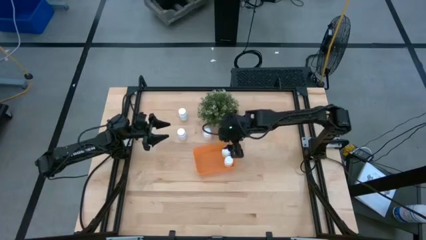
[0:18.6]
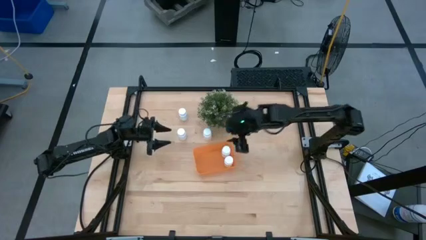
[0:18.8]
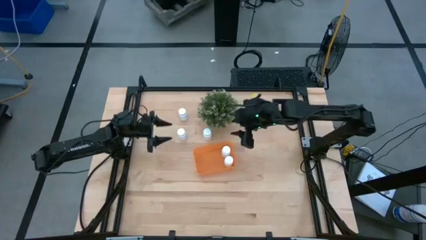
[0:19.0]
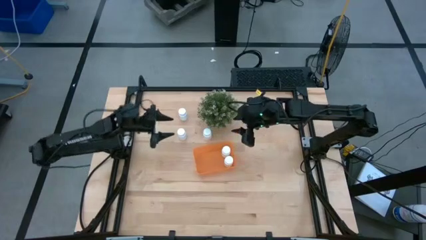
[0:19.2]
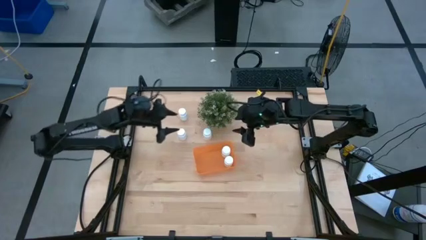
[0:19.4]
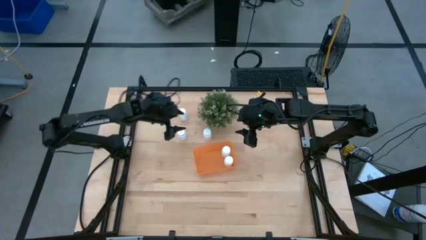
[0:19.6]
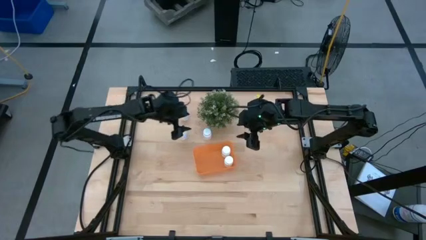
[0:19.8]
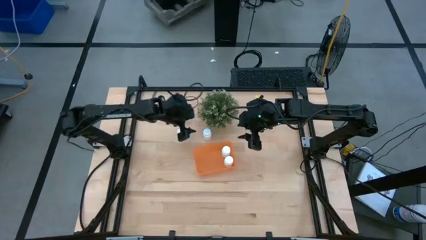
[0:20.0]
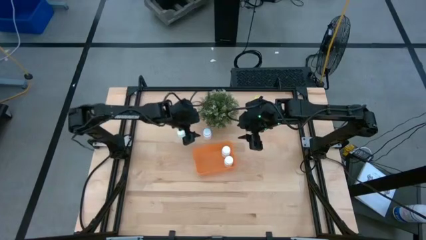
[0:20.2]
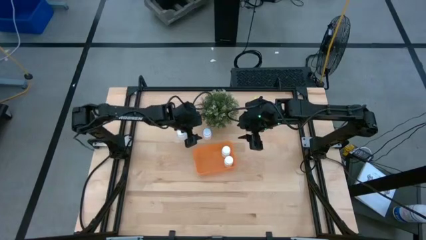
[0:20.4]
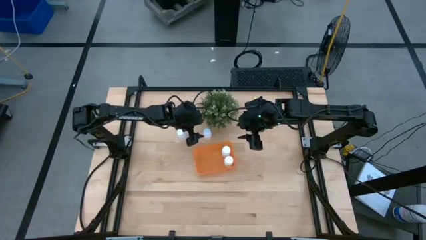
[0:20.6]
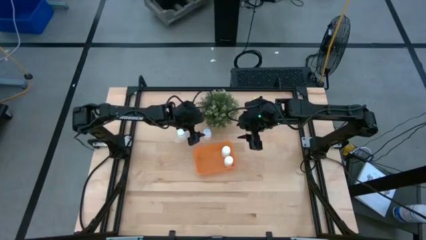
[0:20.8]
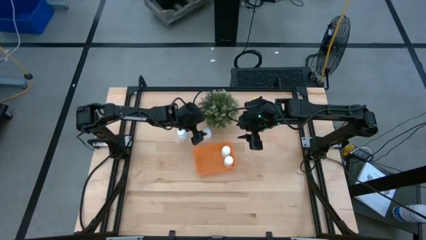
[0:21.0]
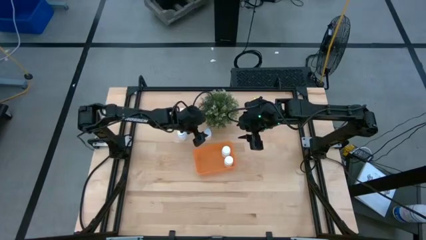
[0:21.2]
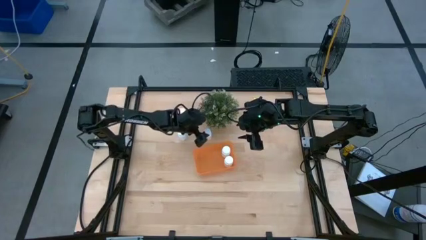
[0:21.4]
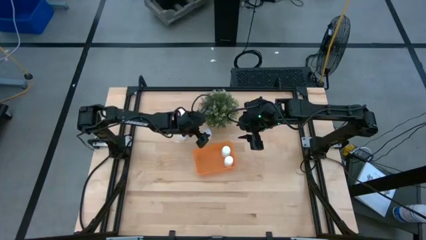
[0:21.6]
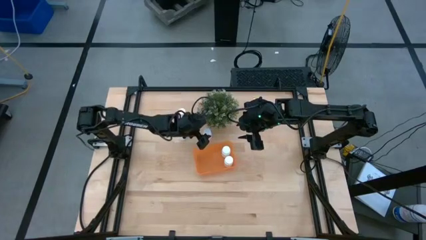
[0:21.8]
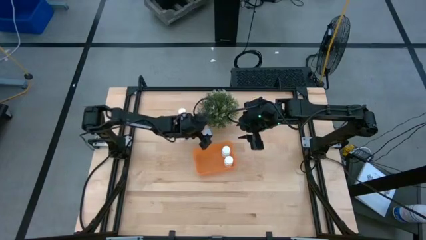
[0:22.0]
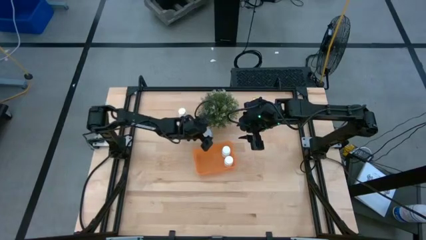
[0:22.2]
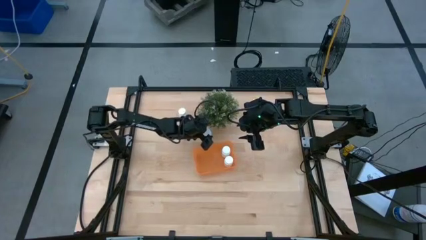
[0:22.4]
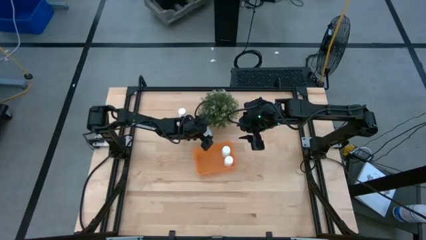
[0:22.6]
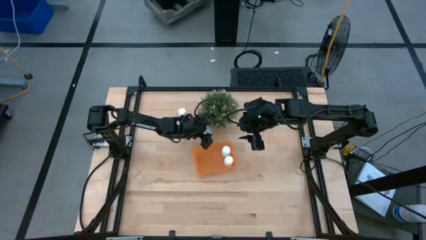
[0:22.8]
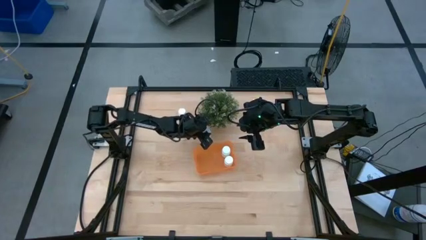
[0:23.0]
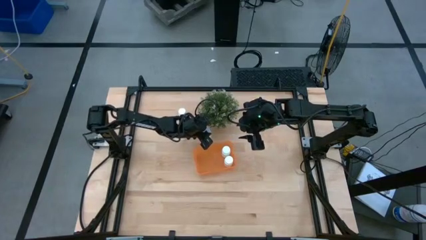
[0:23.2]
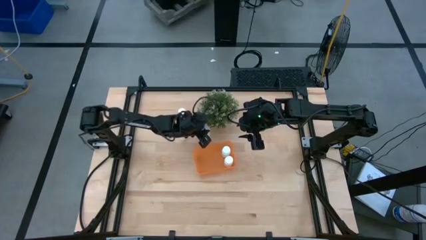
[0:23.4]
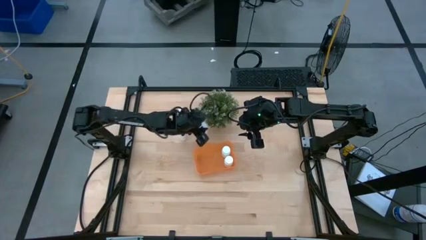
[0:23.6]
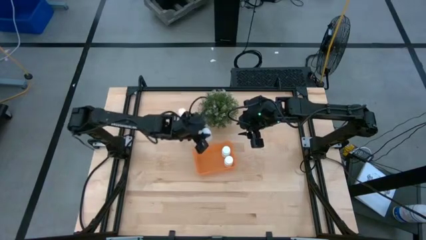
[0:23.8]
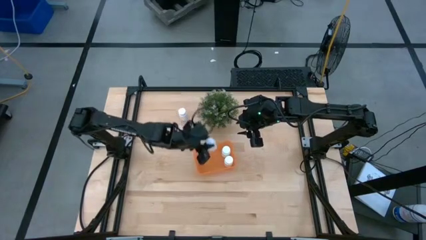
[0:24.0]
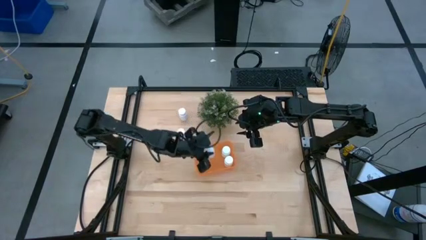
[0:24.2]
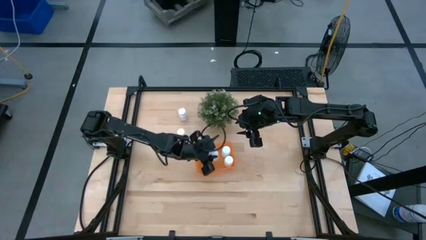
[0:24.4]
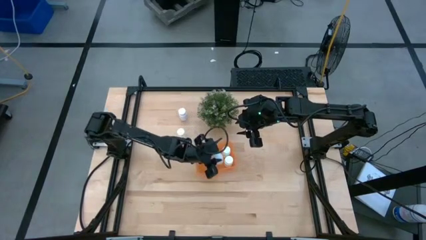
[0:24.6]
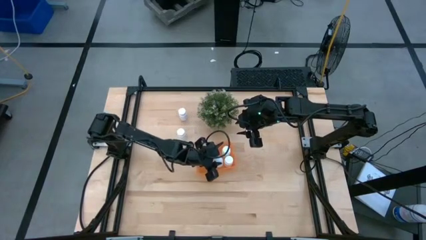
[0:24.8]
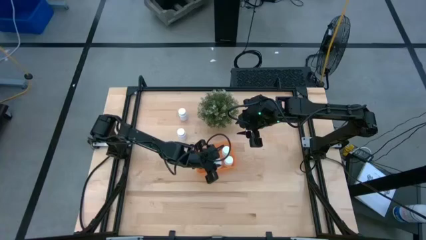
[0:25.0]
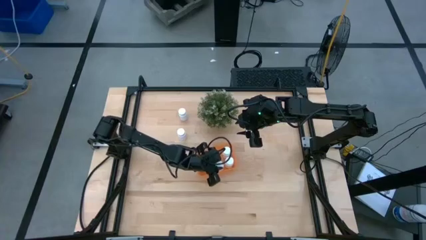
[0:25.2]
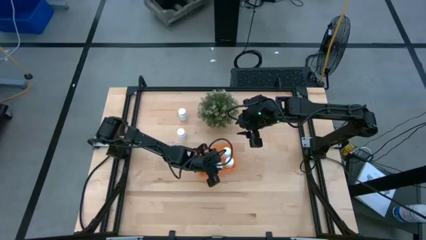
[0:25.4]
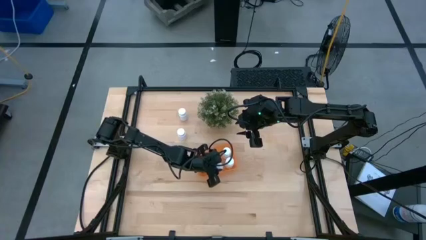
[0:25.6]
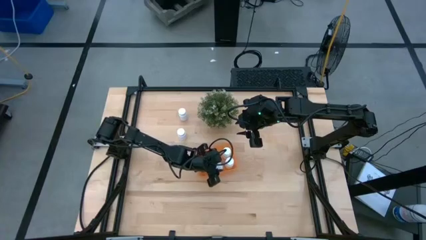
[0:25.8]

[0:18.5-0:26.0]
Task: Pick and place pill bottles into a basket
Put the bottom right white pill bottle into the orange bin

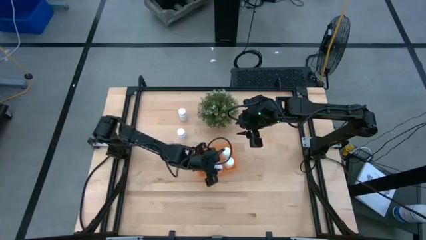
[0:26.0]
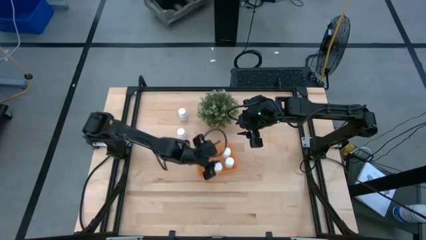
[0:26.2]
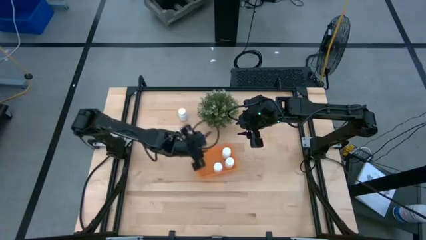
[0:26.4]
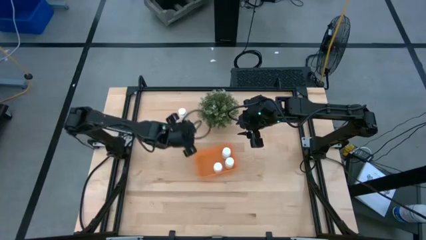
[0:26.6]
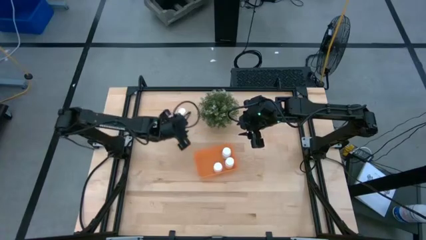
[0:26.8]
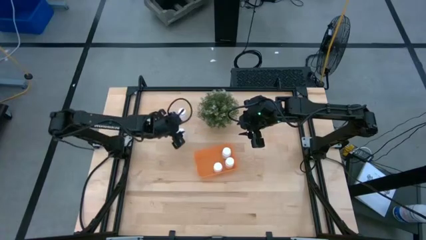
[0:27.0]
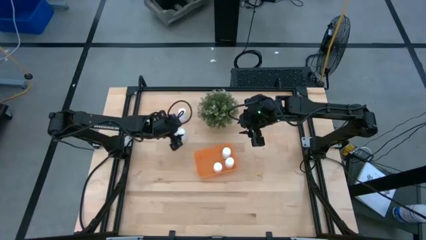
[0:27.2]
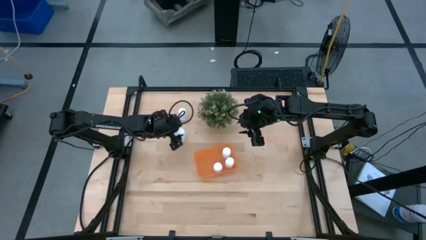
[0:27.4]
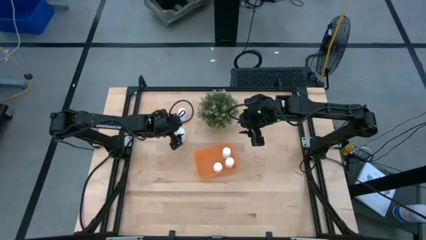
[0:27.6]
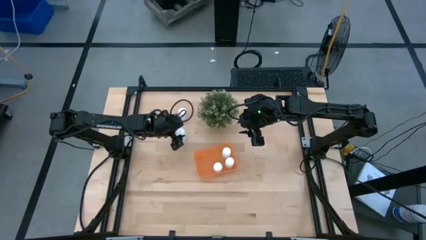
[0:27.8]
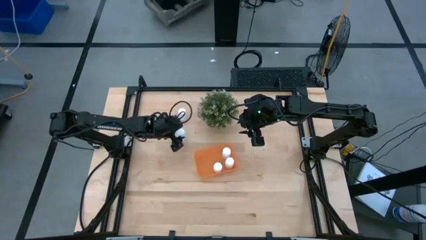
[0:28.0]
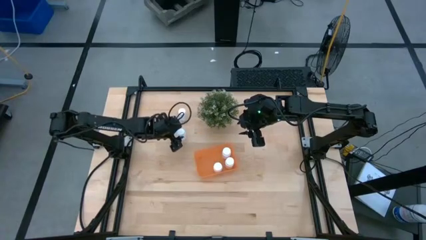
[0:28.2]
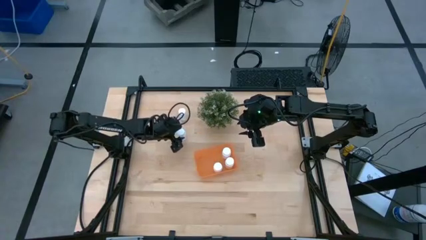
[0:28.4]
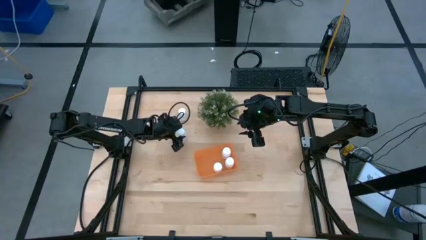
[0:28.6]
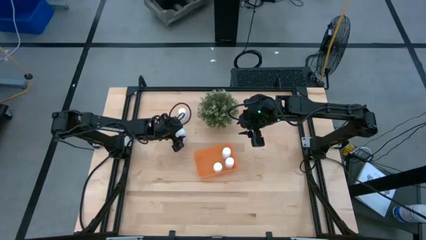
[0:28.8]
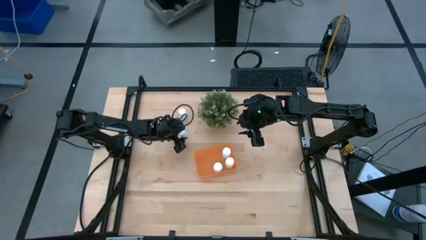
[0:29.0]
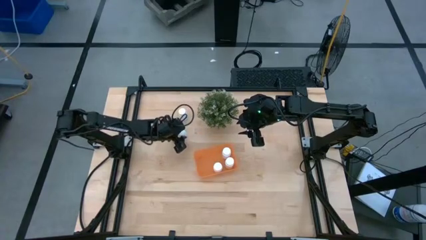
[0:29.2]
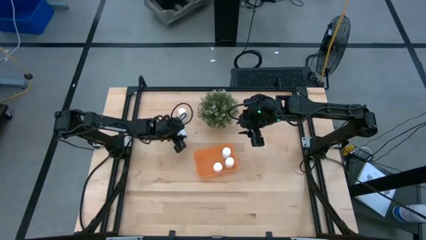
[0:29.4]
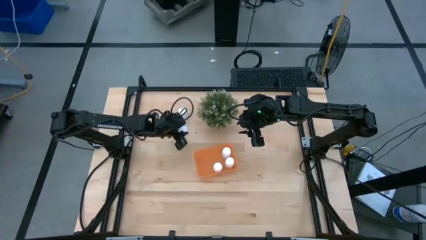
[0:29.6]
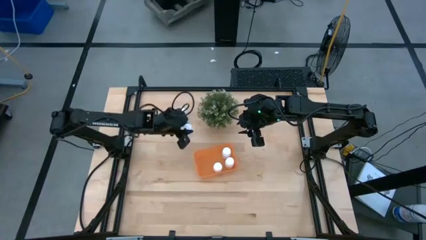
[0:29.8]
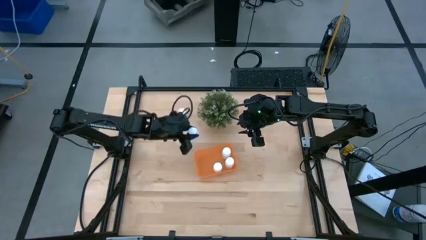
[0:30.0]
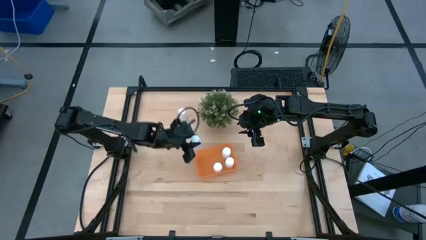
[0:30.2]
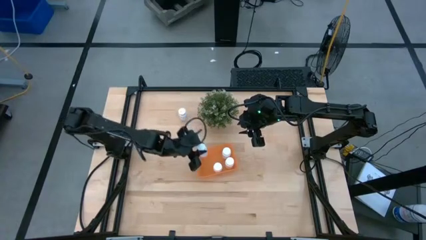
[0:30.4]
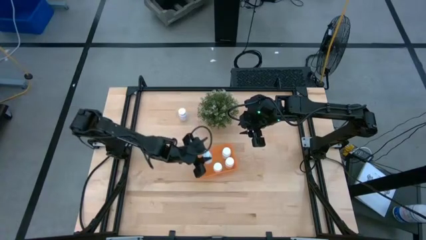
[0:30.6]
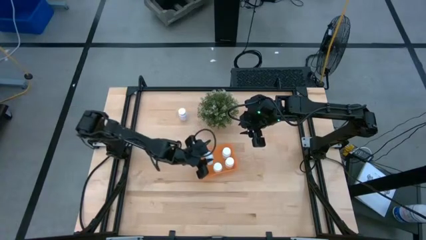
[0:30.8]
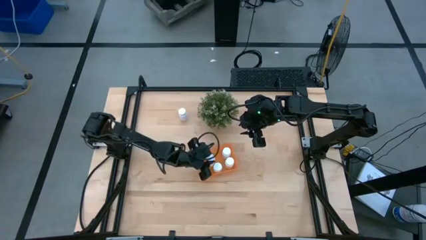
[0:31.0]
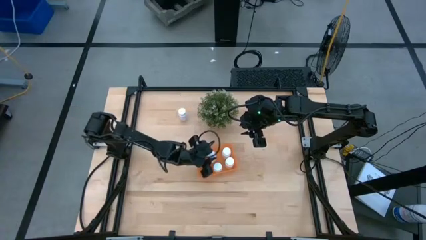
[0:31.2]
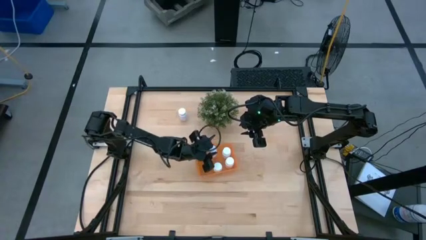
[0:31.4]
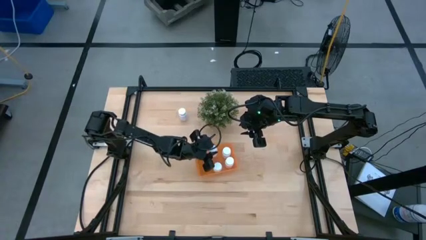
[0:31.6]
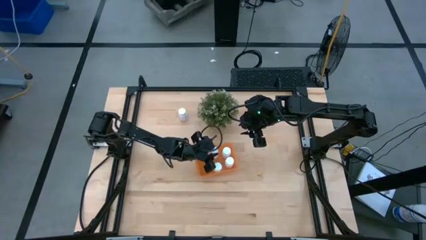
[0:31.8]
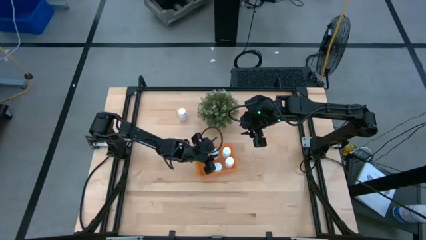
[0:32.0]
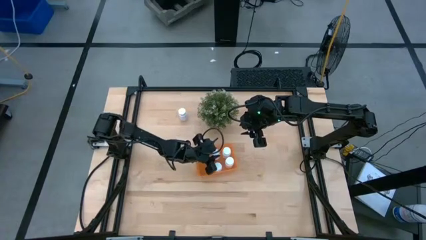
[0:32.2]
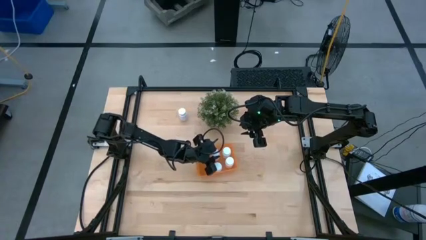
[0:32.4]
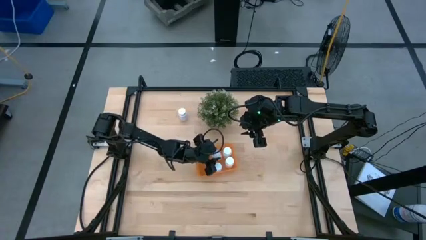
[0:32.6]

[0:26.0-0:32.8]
Put the bottom white pill bottle into the orange bin

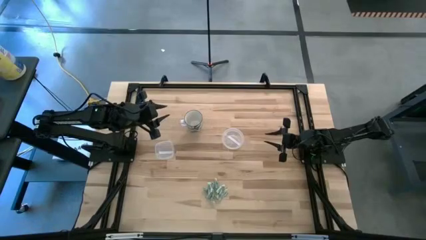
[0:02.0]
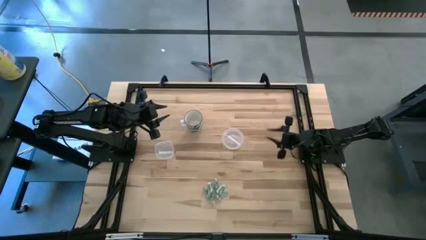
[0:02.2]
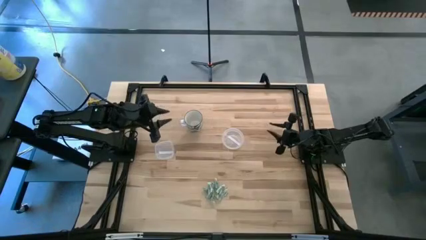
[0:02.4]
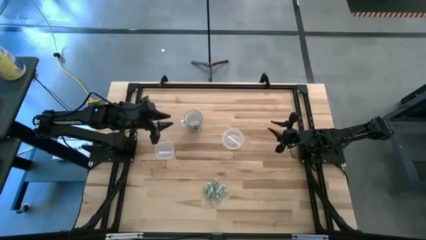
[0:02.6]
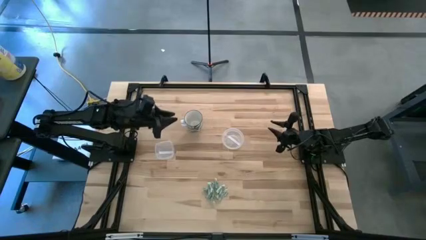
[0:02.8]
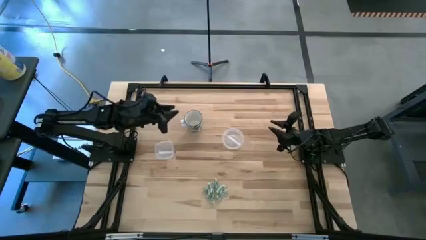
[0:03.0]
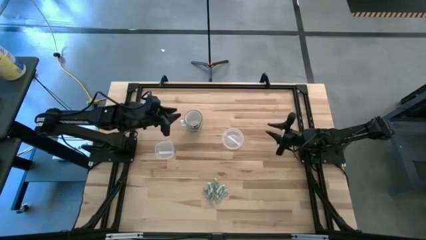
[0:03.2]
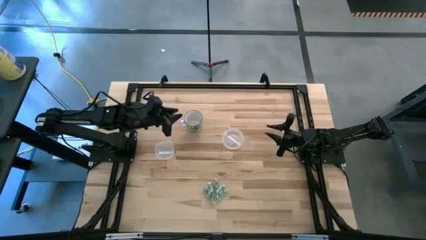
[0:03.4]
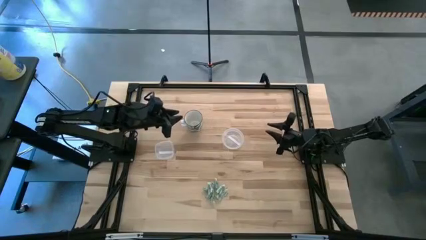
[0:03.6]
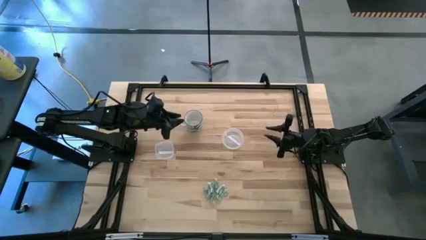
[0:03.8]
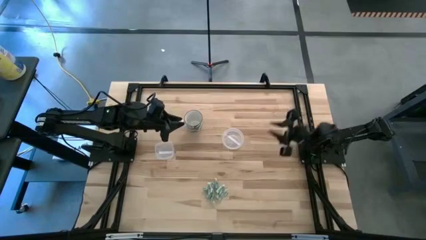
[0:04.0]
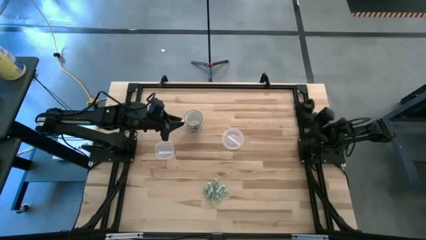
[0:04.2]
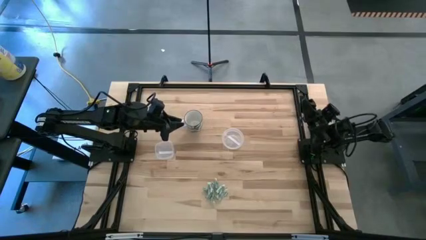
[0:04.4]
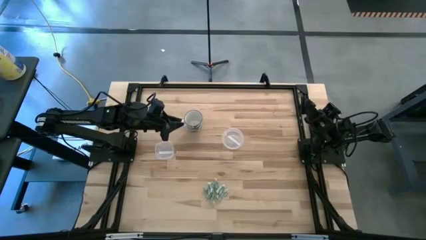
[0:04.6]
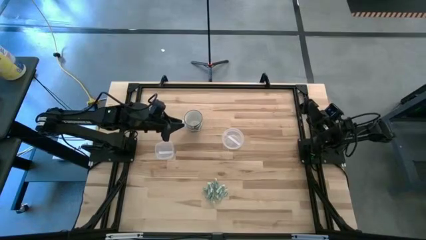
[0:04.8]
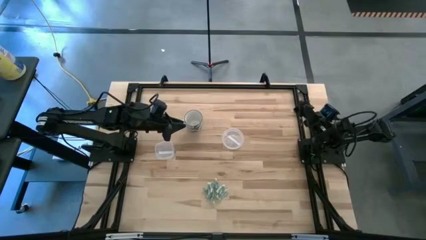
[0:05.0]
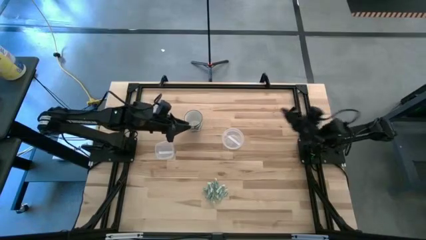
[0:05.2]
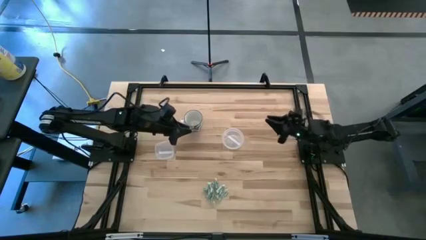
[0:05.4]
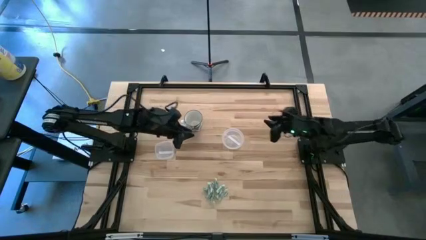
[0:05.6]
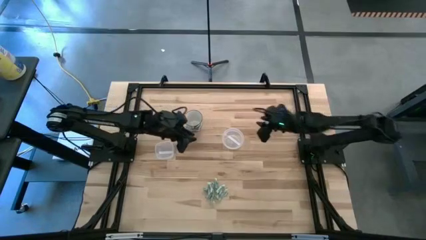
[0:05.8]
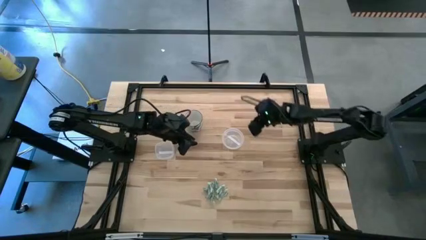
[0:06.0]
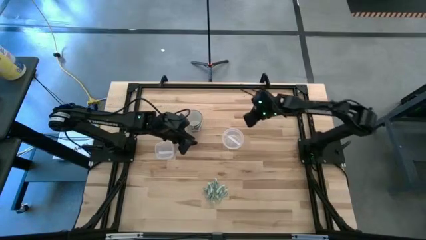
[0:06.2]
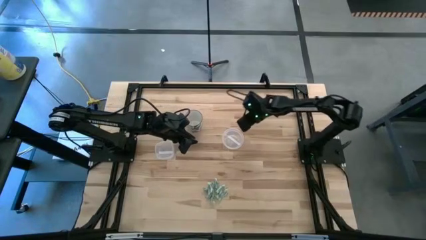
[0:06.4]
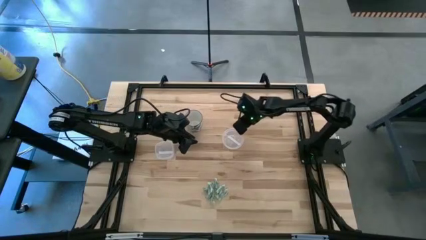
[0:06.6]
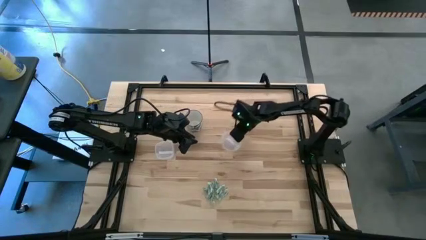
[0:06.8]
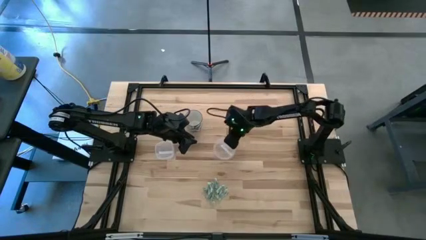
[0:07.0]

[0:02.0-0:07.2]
Task: Pick and place Stevia / Truvia into bins
Adjust the right transparent container
